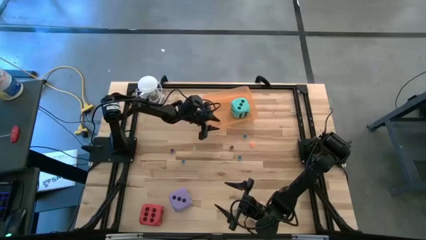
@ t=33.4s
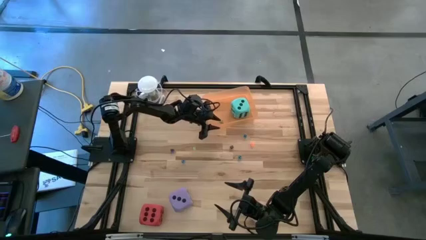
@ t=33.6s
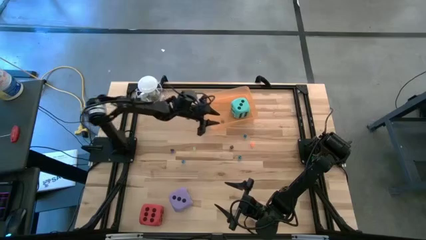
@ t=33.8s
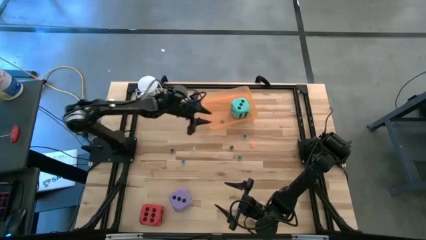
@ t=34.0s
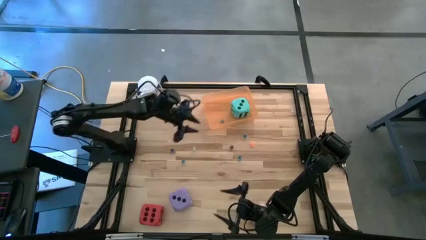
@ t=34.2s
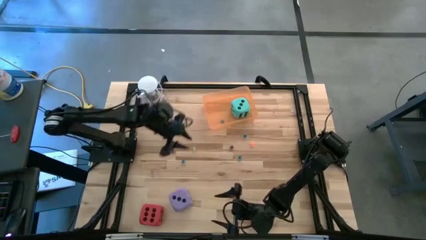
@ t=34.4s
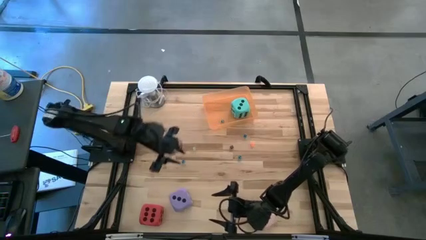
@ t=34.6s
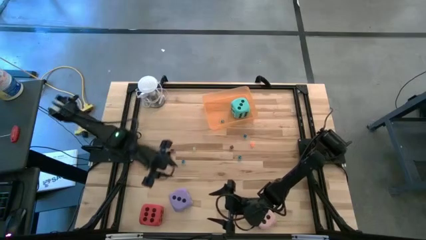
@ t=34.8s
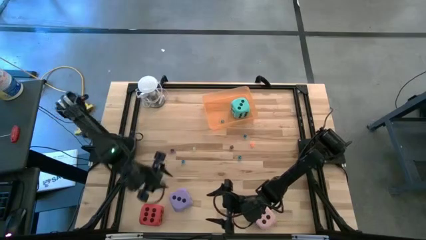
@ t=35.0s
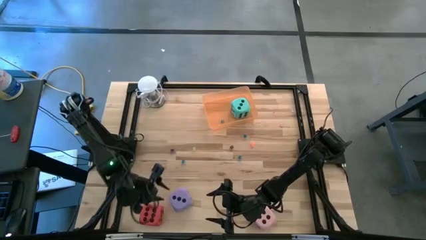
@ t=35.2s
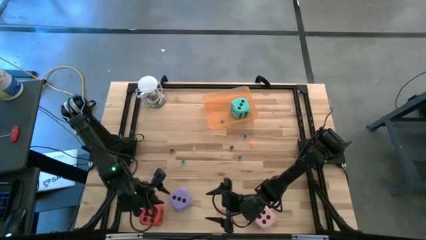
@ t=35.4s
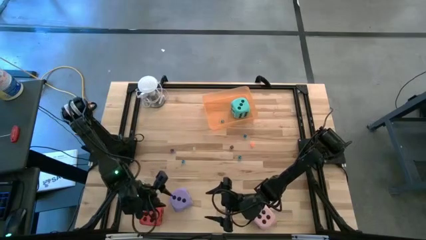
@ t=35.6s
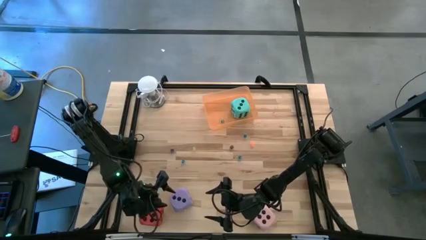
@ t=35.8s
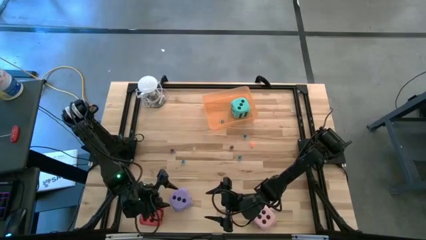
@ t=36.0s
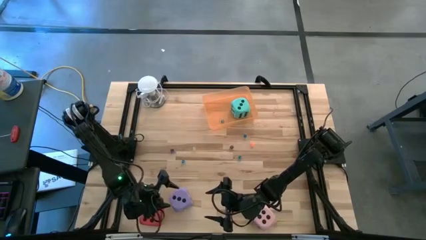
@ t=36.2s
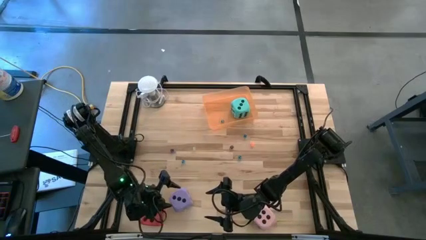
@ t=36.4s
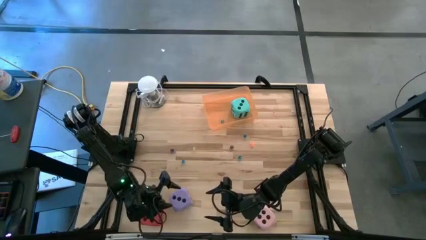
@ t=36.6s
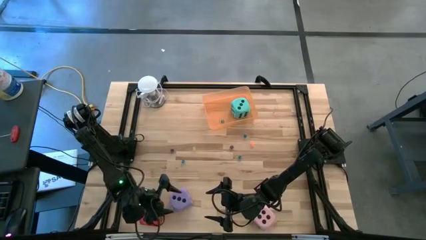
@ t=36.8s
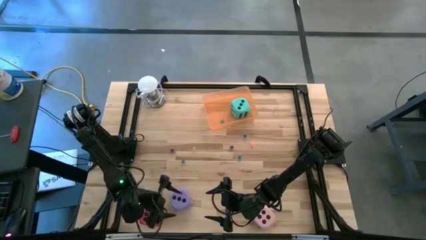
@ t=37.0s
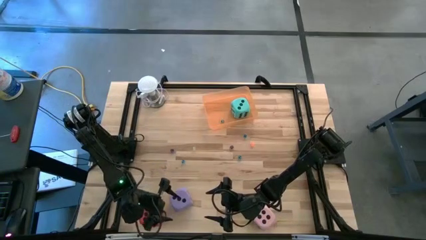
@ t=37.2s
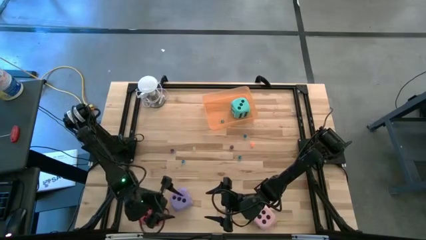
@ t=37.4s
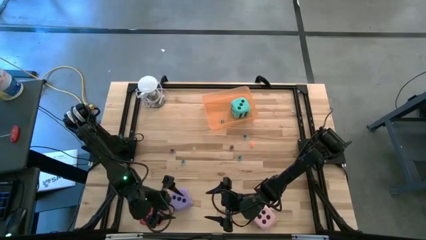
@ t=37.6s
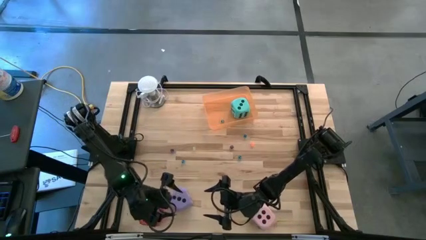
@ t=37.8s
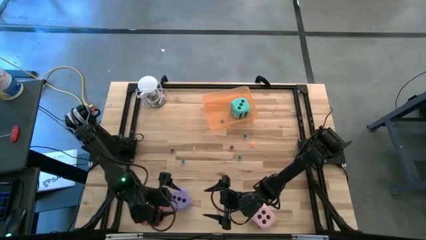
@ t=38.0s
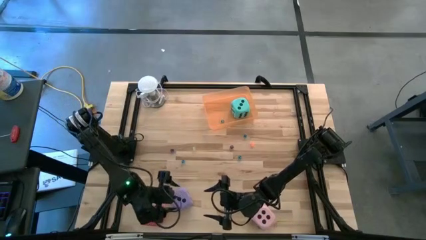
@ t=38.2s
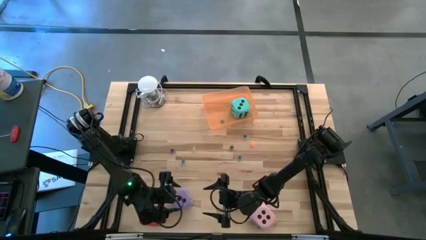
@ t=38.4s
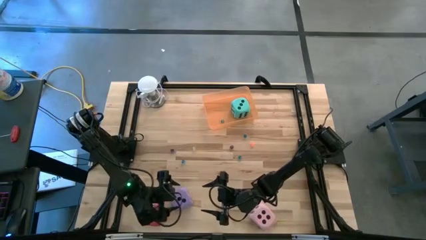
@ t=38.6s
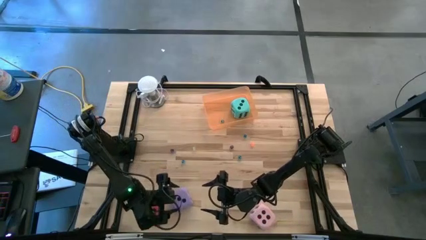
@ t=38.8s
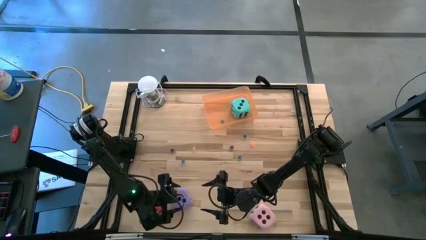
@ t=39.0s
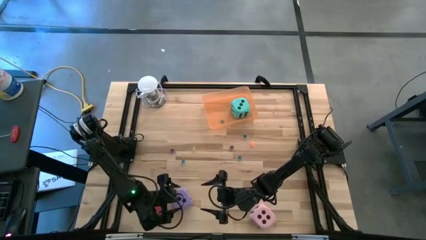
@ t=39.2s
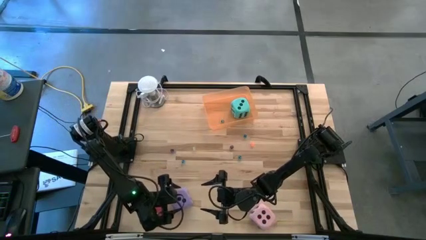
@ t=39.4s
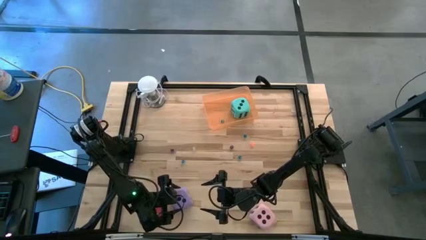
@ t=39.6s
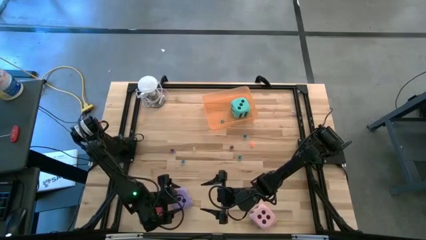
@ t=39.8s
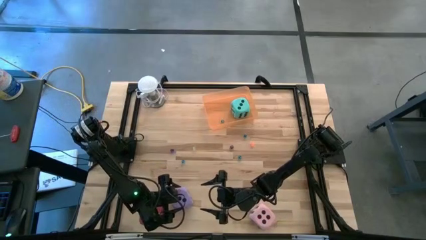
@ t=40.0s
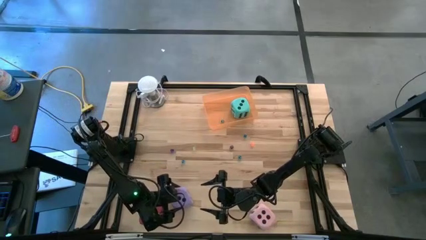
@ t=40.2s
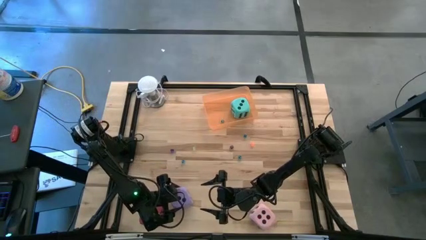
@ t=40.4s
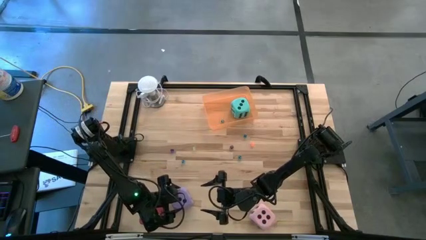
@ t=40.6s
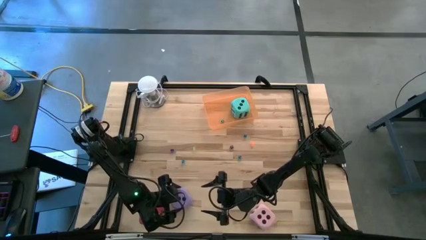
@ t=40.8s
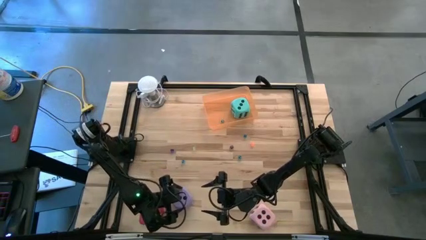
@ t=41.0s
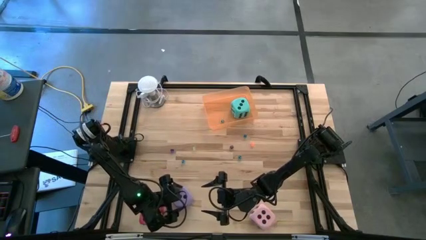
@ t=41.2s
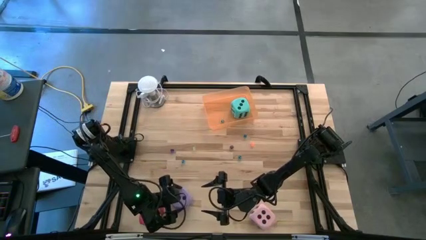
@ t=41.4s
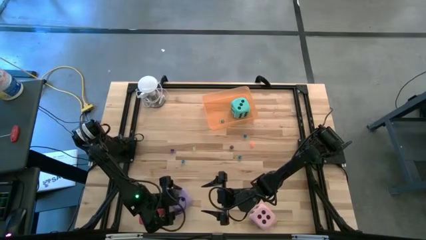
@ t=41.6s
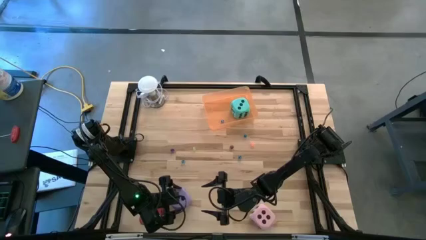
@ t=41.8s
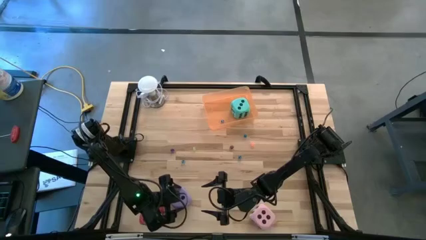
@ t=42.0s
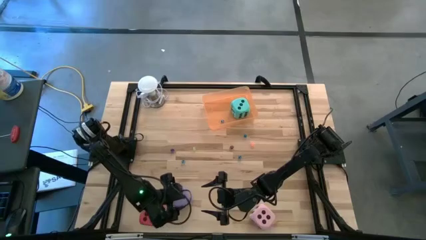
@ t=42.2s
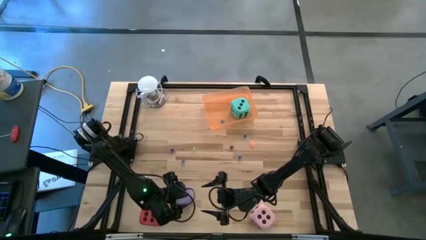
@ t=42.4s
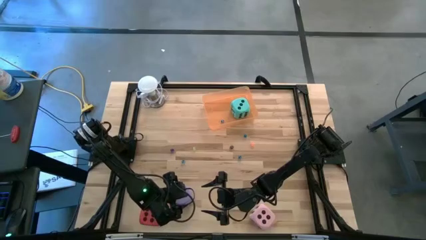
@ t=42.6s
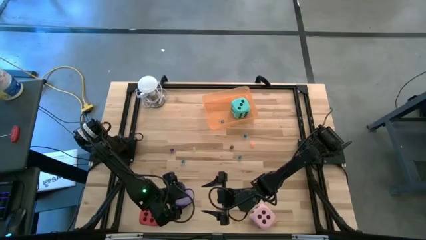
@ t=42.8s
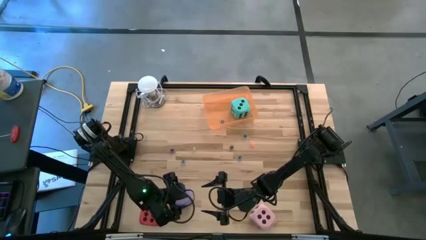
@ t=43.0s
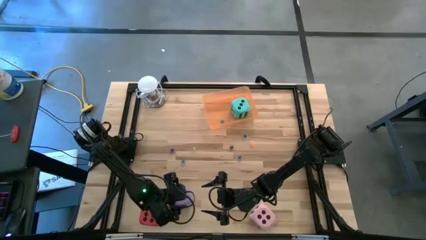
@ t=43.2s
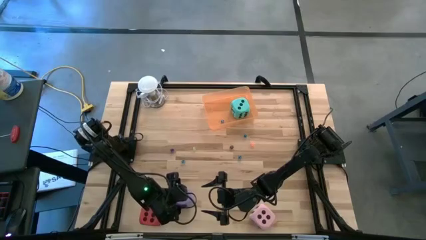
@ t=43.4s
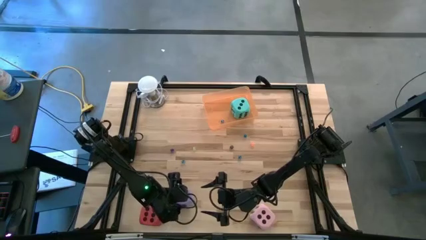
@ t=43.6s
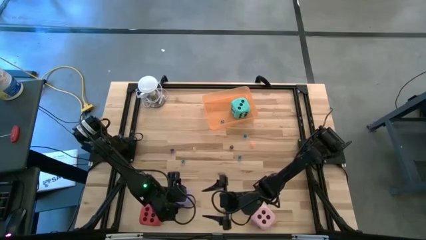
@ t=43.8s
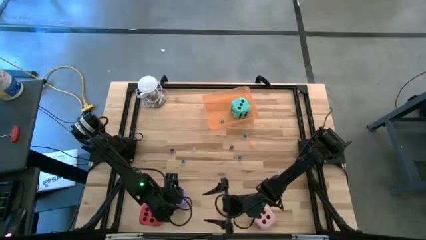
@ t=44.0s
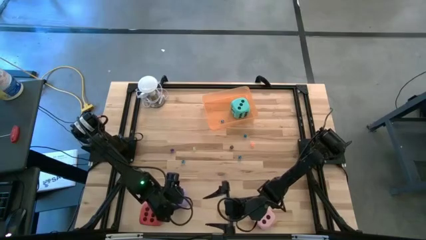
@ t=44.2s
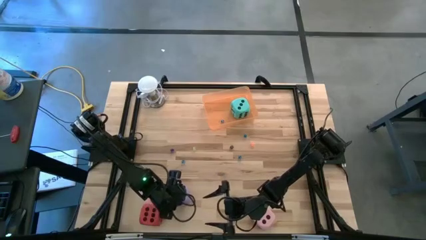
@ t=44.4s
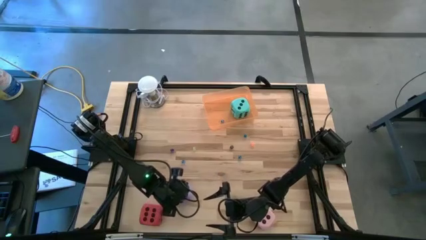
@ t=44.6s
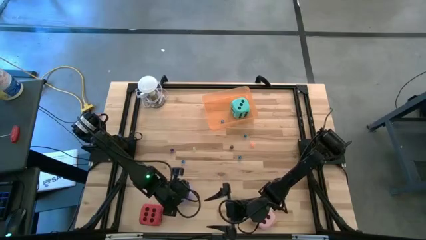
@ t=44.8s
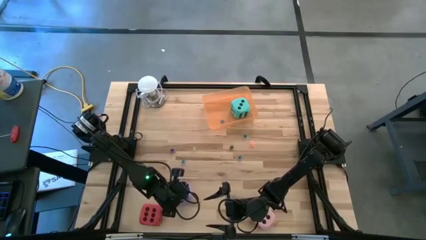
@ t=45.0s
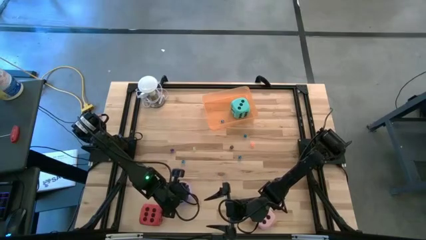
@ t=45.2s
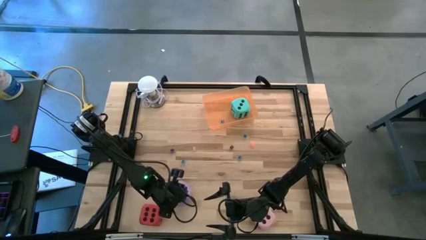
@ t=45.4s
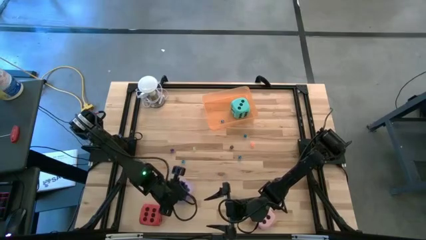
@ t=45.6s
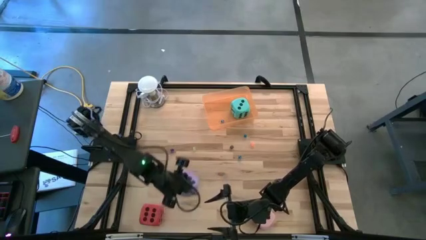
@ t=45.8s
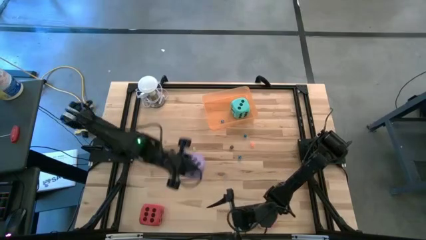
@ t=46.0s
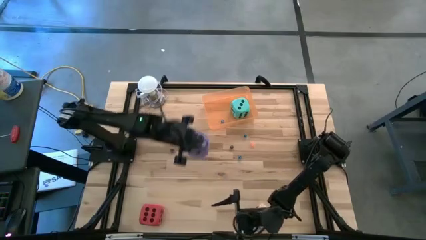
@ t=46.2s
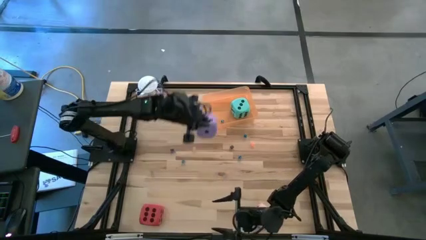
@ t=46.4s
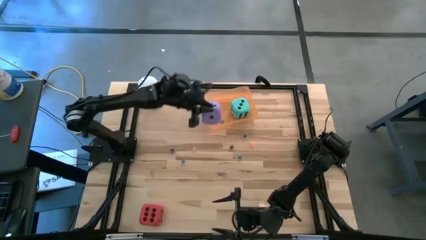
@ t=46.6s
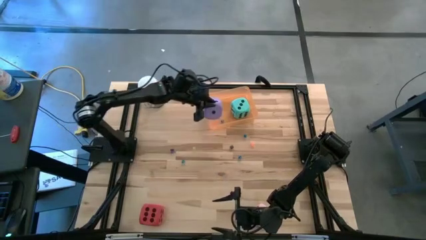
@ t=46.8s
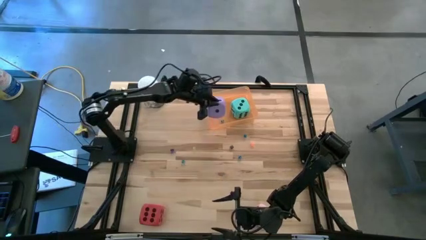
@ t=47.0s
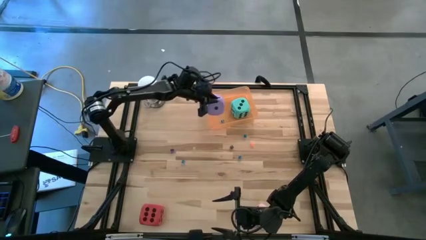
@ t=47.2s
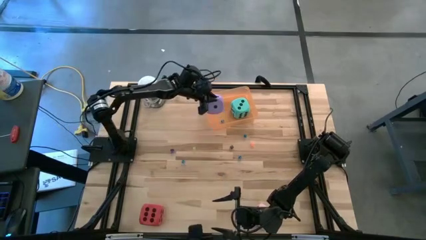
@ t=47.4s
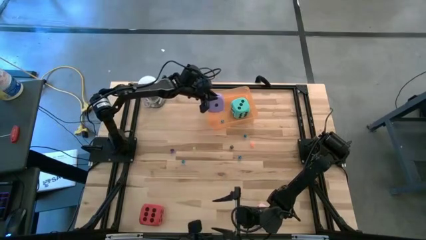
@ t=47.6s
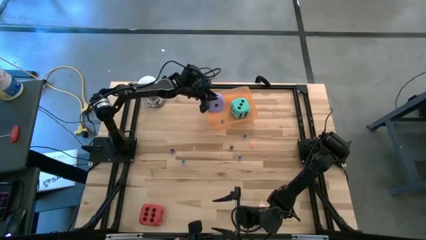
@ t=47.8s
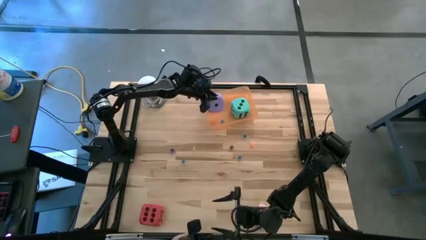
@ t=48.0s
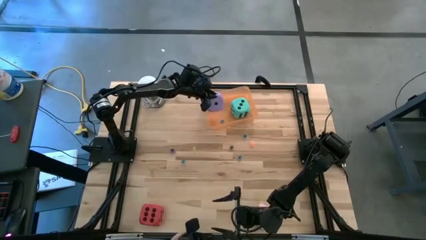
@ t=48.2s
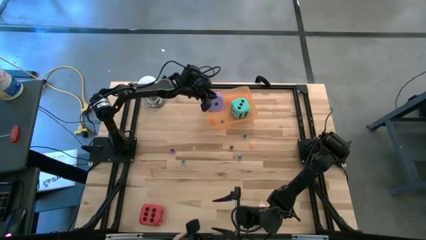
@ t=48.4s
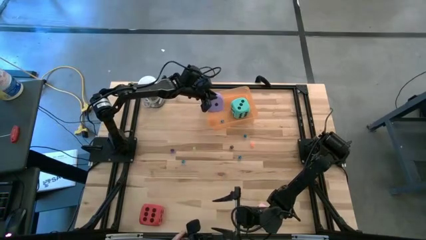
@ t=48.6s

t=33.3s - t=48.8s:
Task: Pick & Place Dice
Put the purple die into the orange bin
